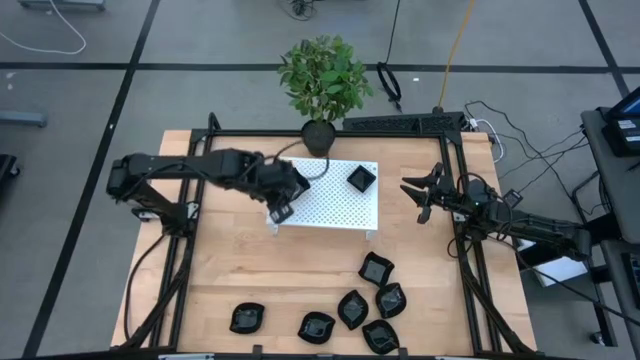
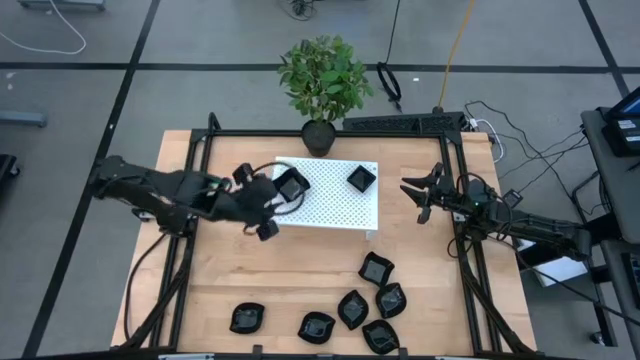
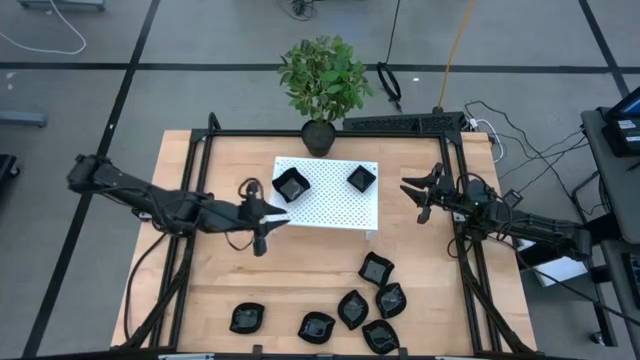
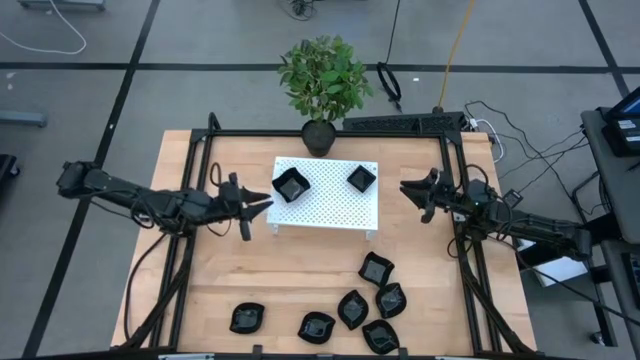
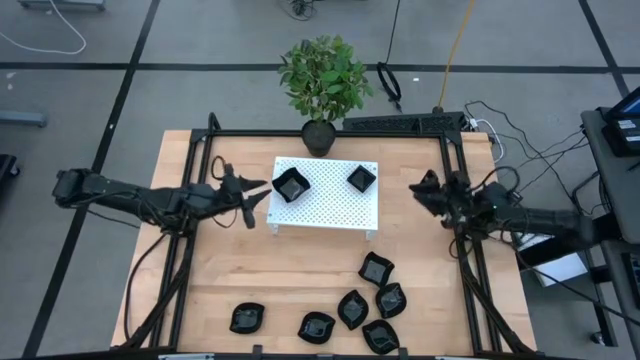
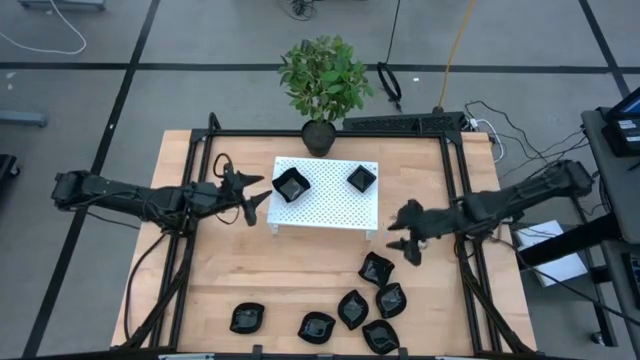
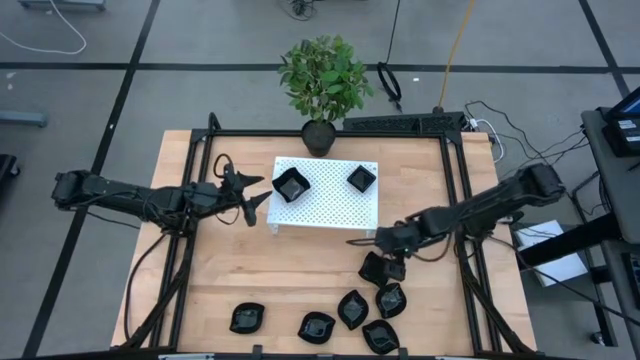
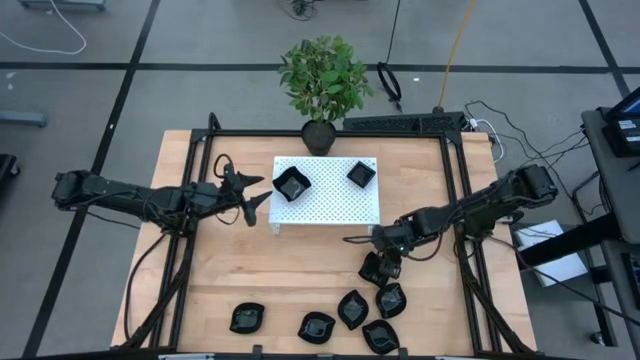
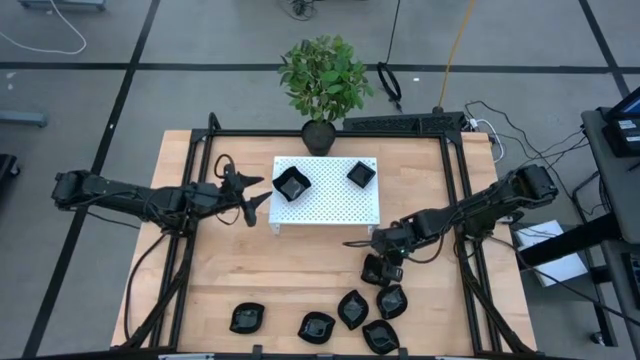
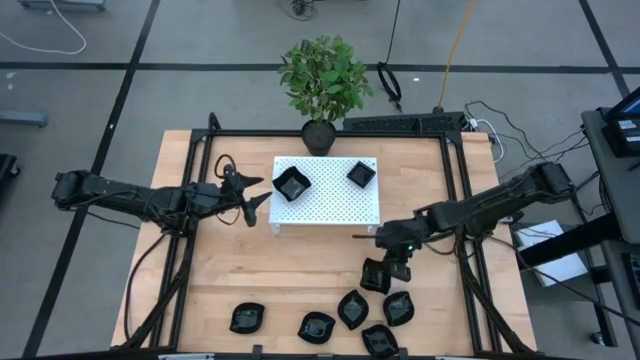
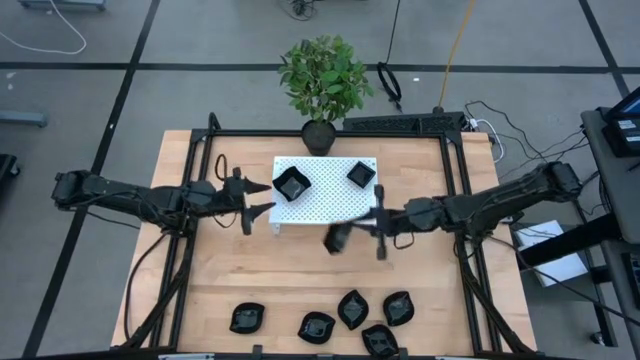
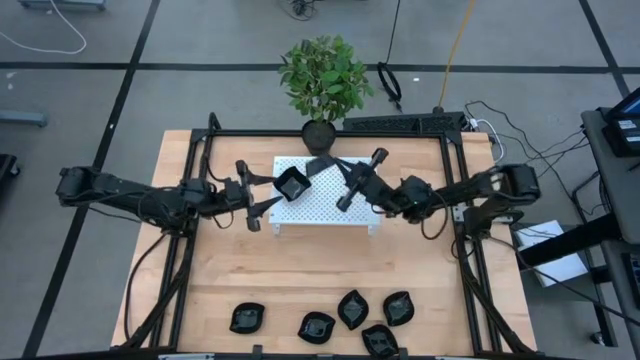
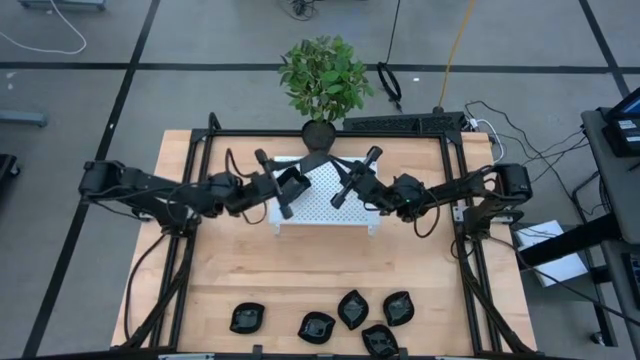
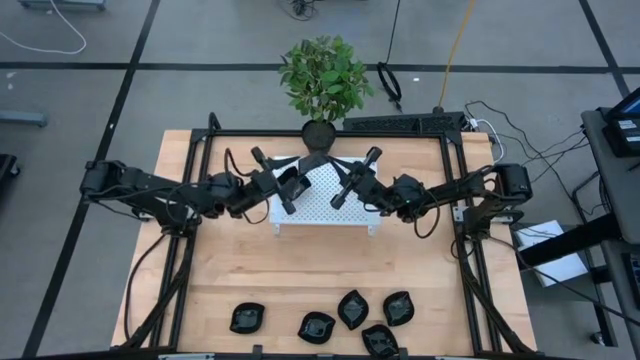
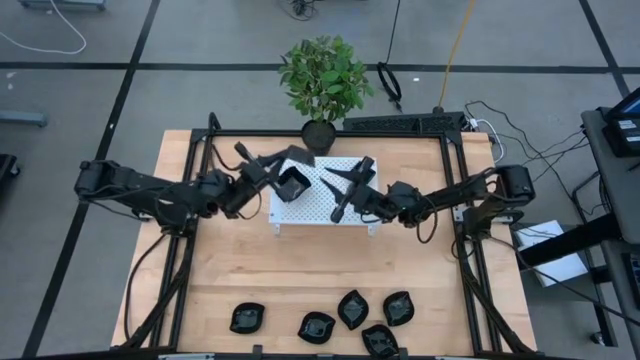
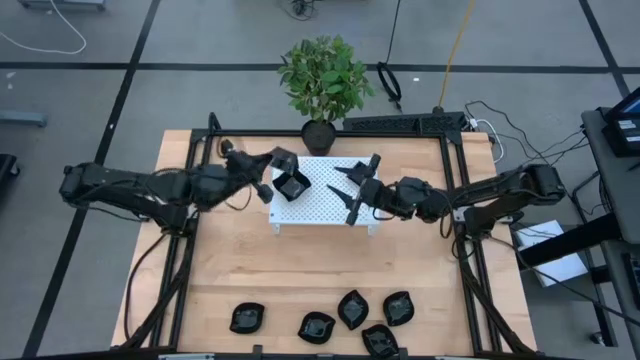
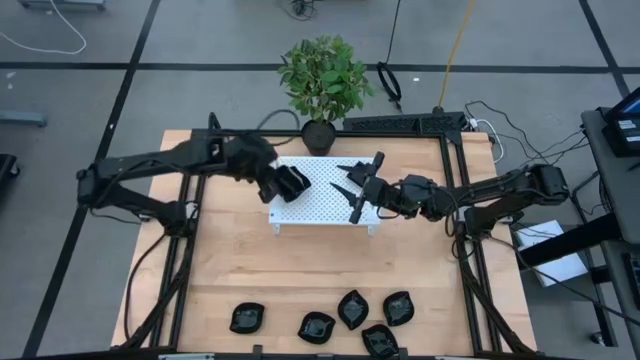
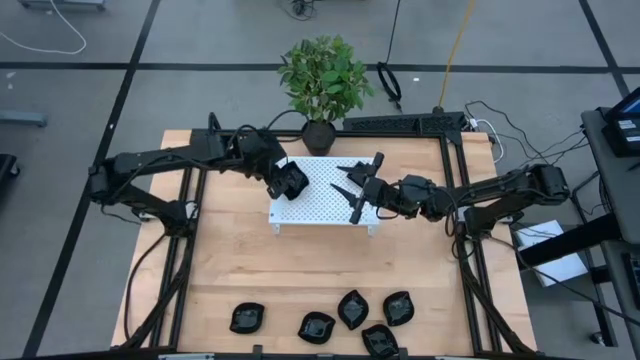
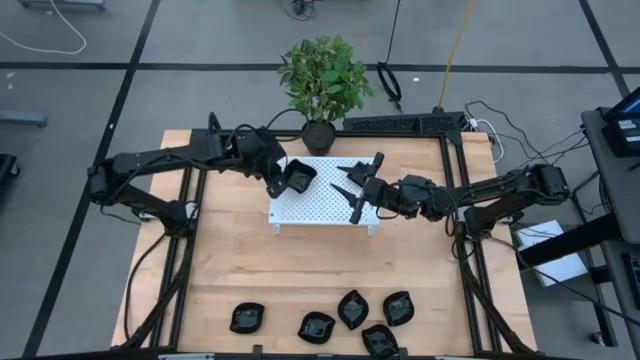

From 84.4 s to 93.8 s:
Task: Pick & Place Mini shaped plates
Stack the black distorted square plate on top of the black distorted square plate on the shelf

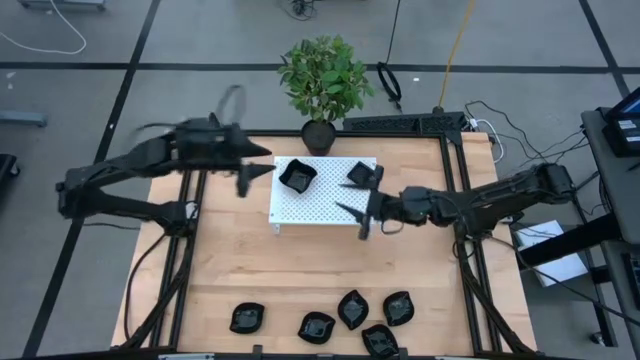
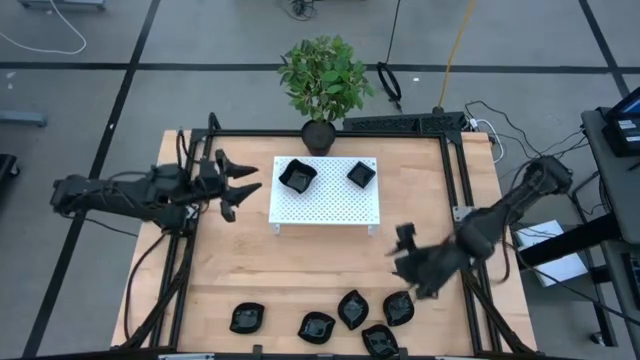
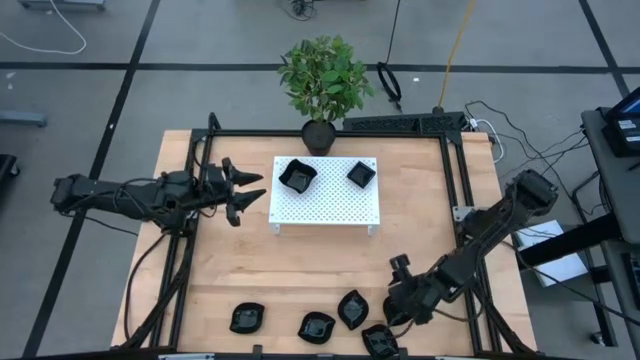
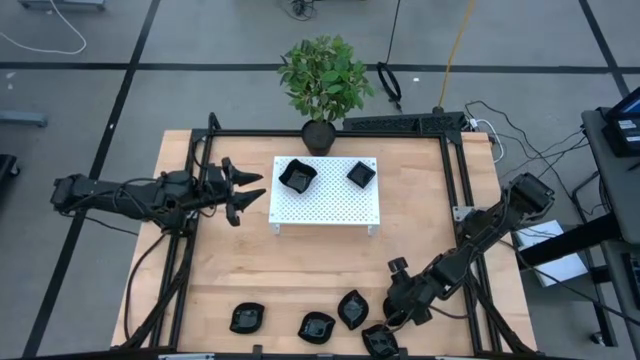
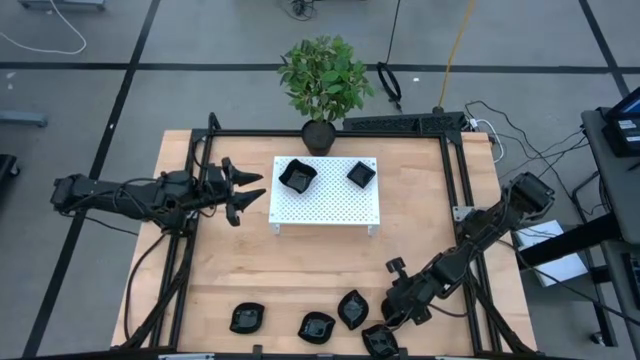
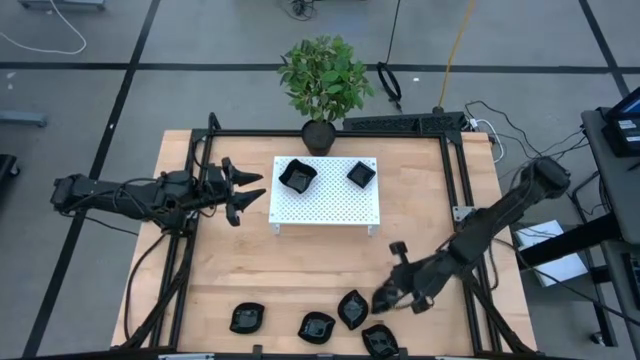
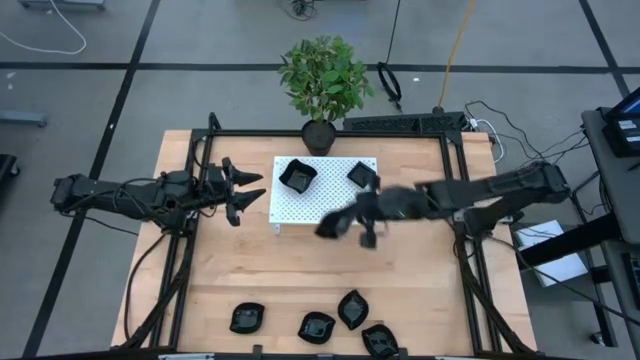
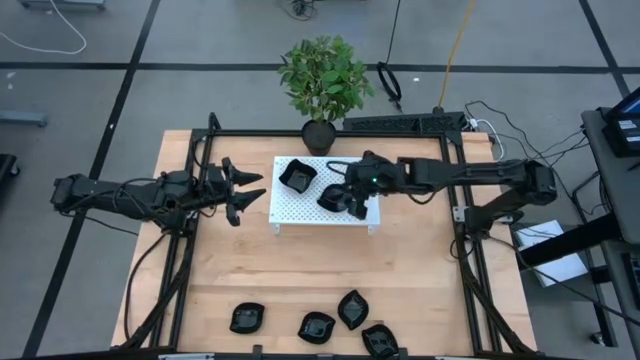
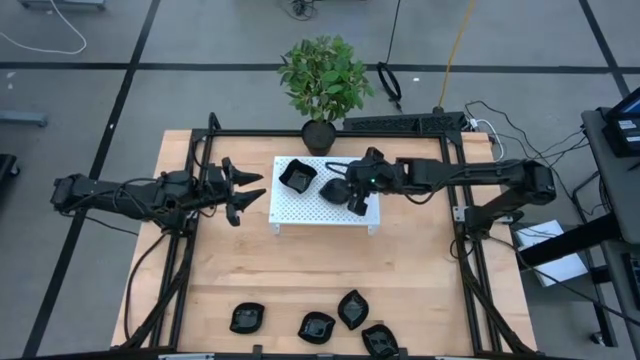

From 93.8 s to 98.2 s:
Put the black leaf-shaped plate on the shelf

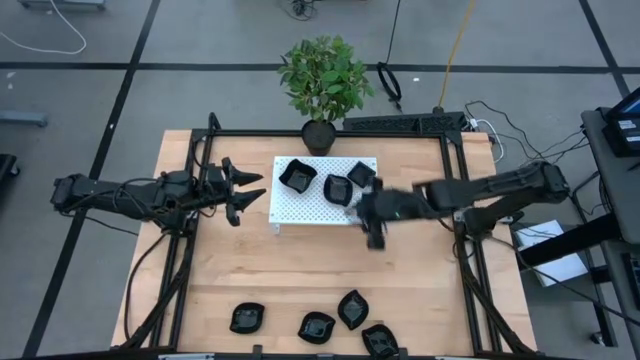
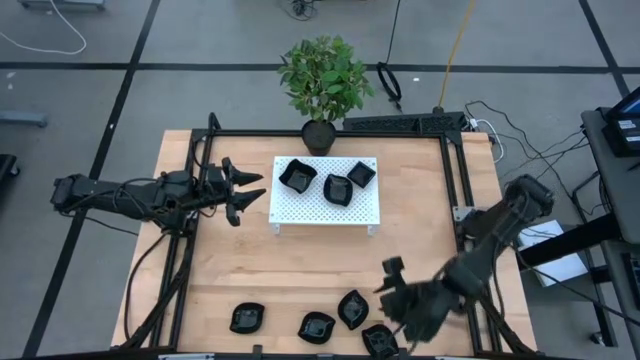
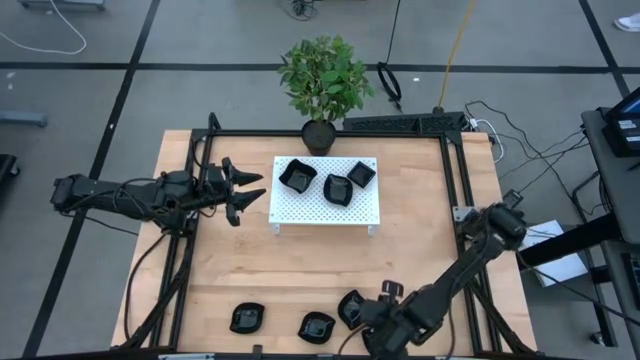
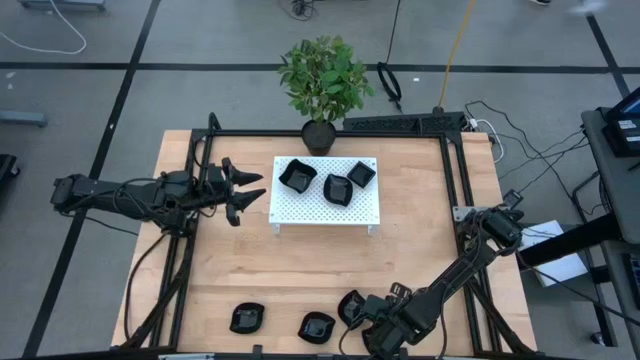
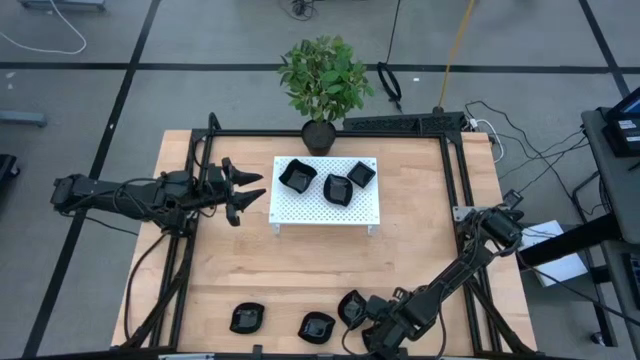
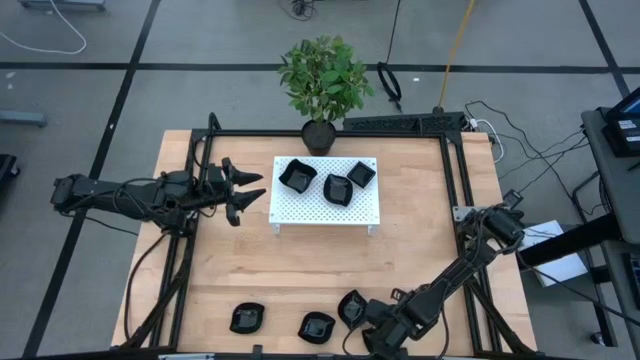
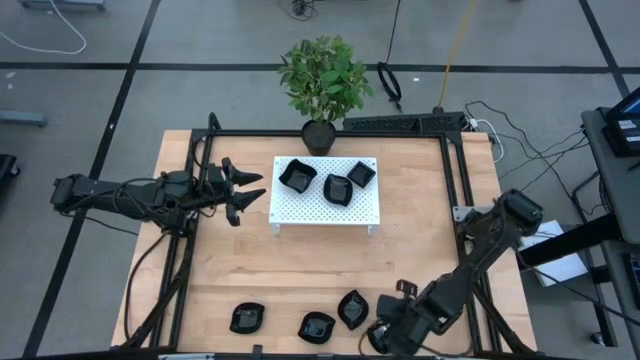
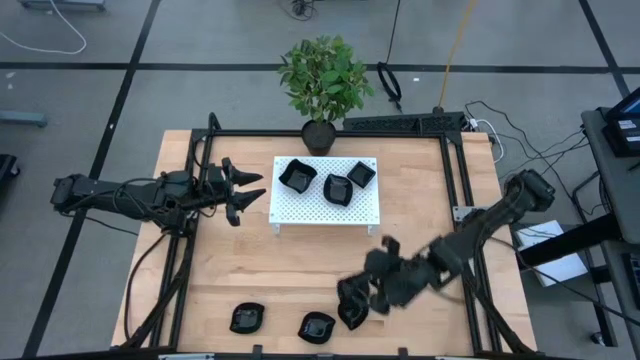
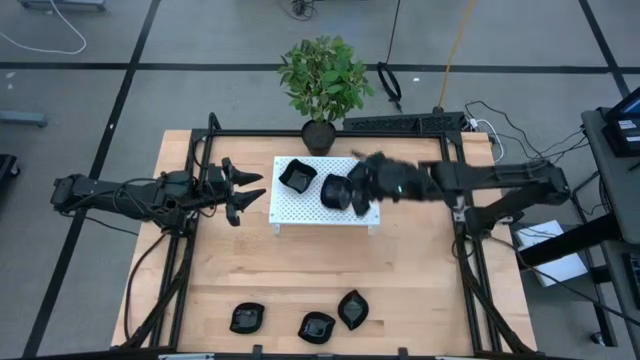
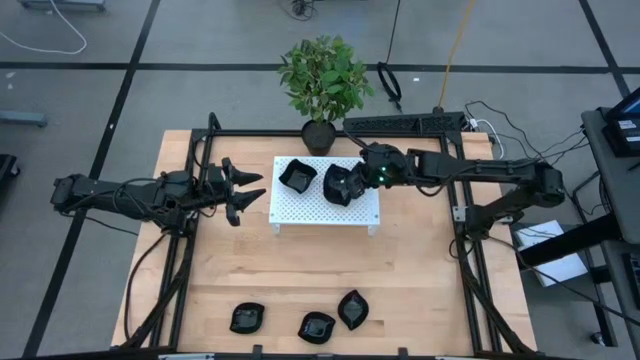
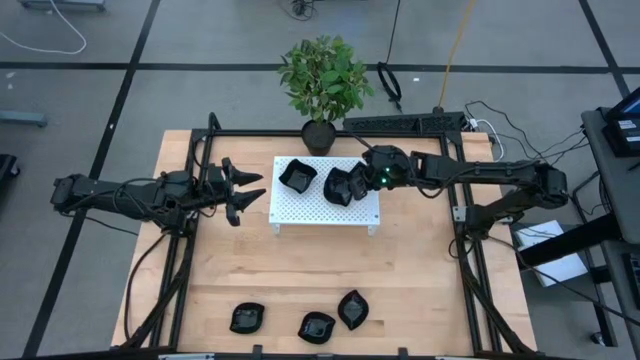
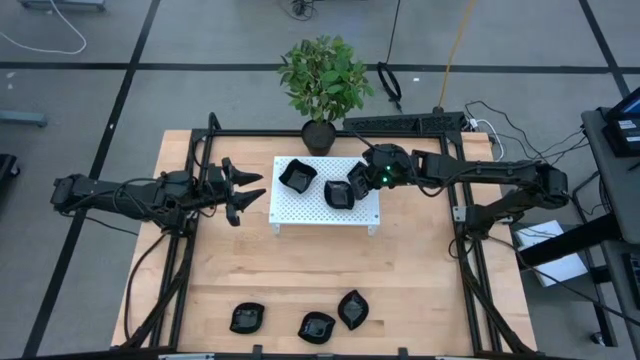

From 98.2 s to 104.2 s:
Stack the black leaf-shaped plate on top of the black leaf-shaped plate on the shelf
